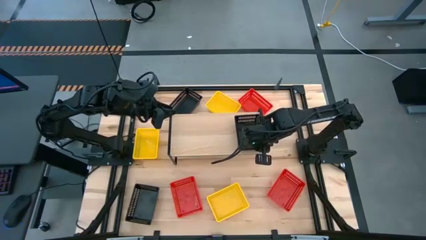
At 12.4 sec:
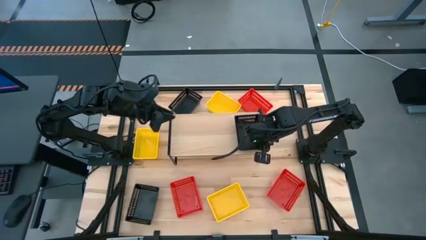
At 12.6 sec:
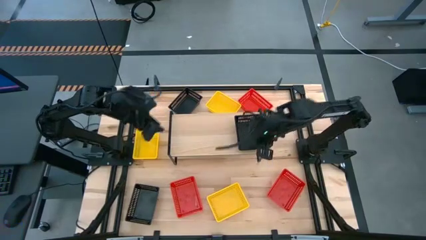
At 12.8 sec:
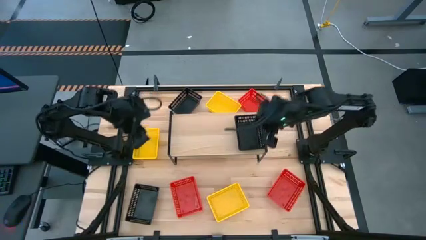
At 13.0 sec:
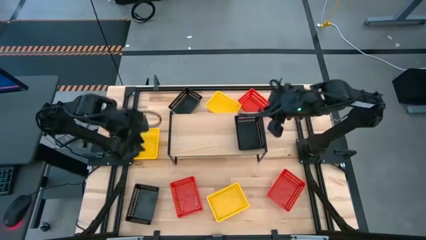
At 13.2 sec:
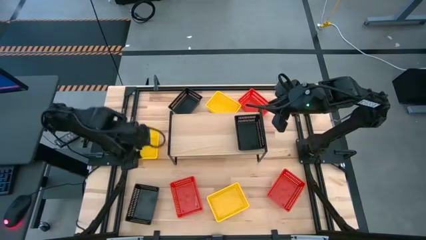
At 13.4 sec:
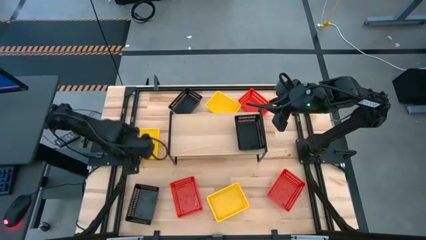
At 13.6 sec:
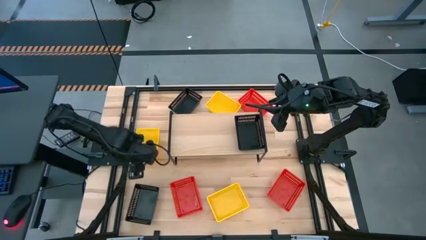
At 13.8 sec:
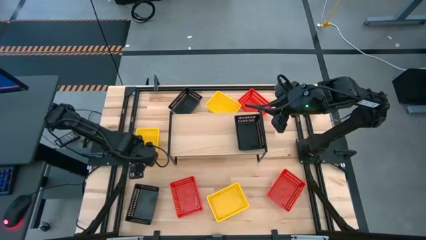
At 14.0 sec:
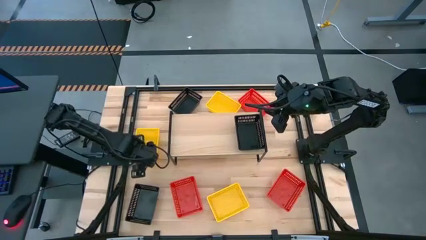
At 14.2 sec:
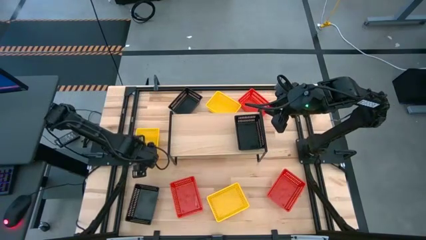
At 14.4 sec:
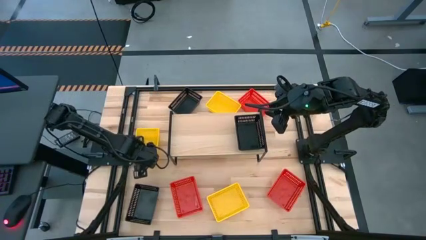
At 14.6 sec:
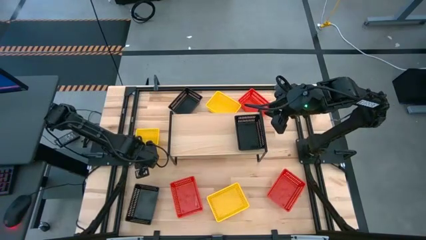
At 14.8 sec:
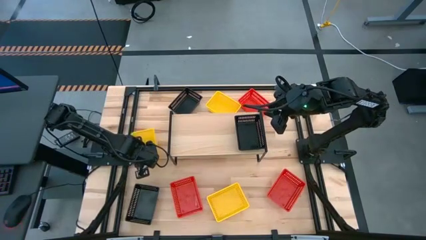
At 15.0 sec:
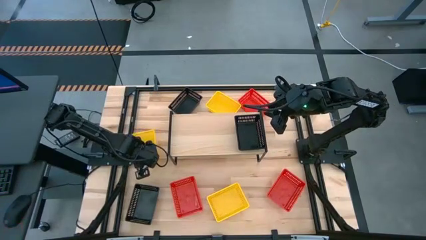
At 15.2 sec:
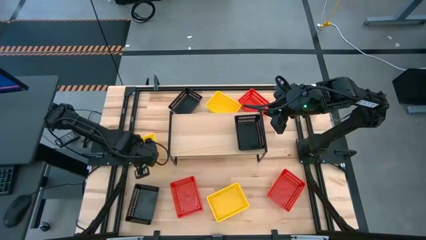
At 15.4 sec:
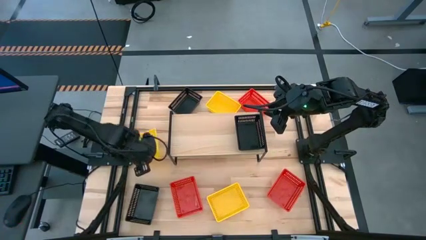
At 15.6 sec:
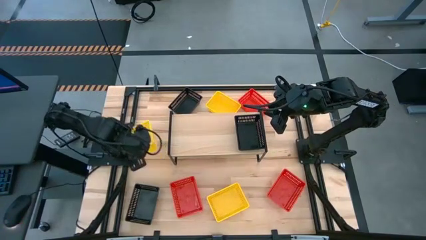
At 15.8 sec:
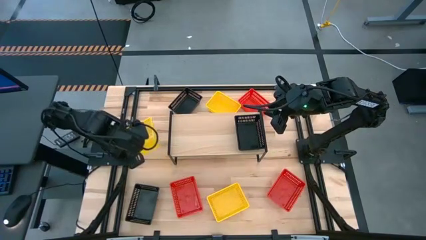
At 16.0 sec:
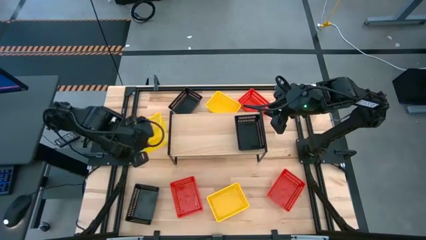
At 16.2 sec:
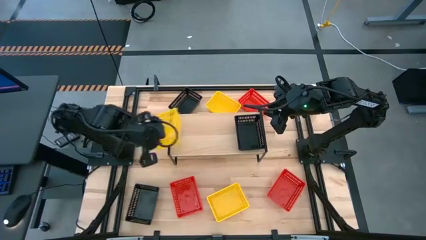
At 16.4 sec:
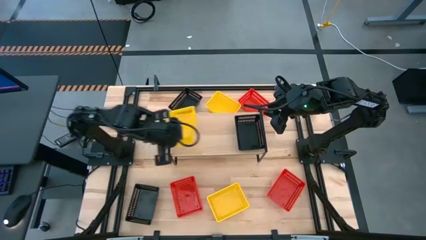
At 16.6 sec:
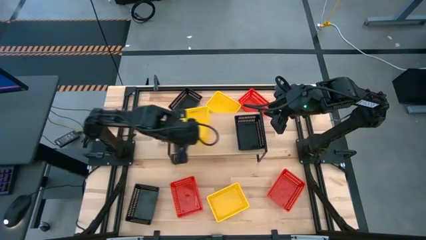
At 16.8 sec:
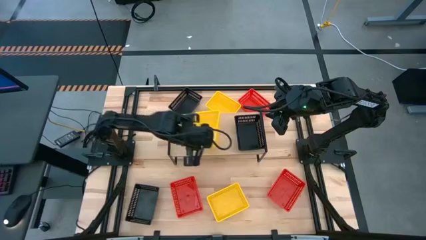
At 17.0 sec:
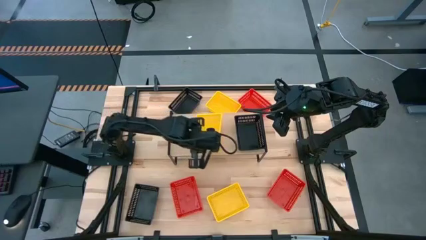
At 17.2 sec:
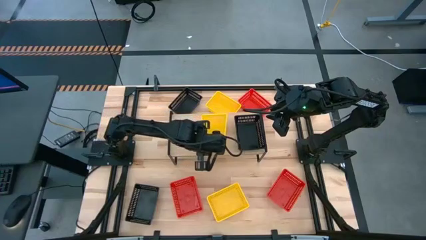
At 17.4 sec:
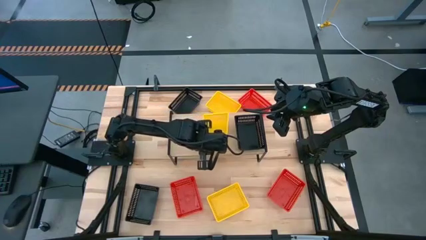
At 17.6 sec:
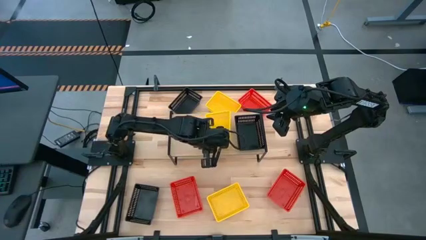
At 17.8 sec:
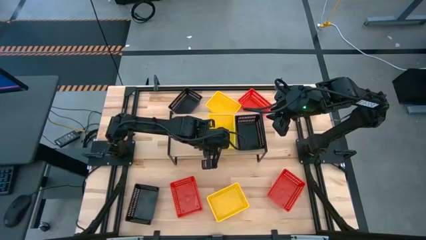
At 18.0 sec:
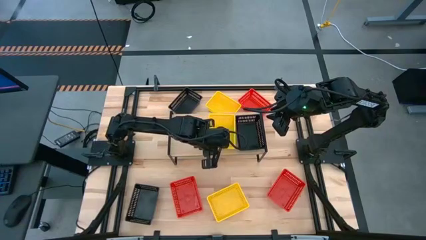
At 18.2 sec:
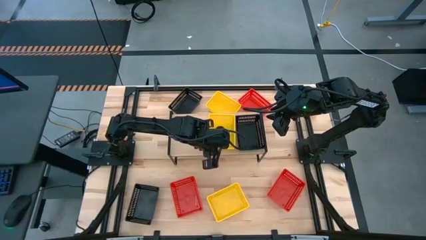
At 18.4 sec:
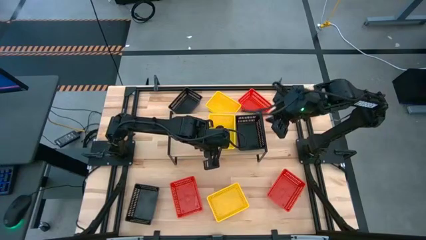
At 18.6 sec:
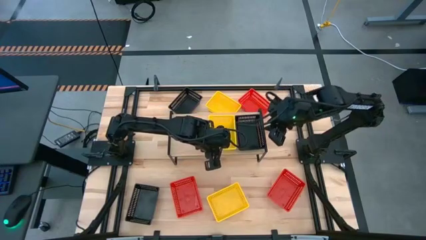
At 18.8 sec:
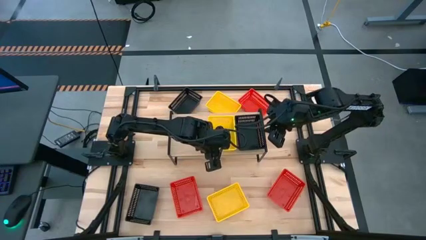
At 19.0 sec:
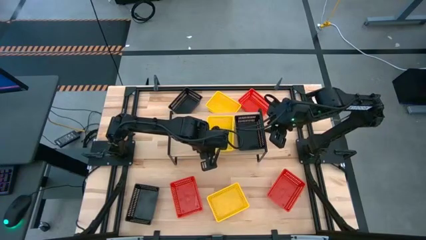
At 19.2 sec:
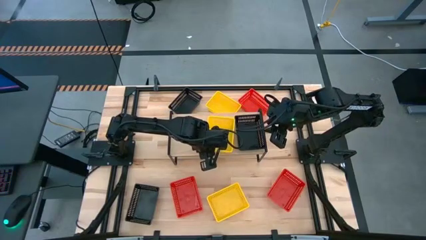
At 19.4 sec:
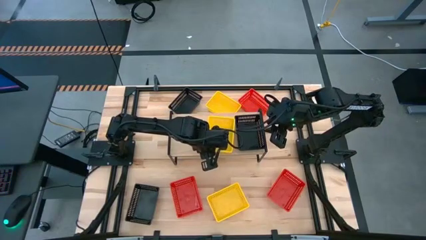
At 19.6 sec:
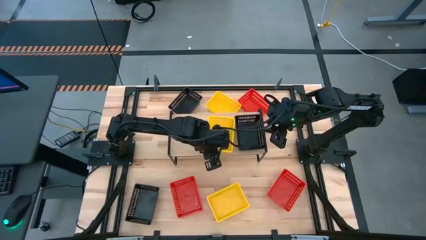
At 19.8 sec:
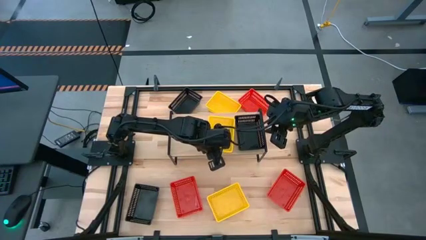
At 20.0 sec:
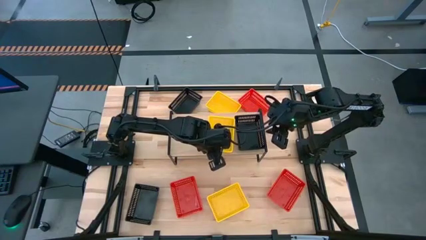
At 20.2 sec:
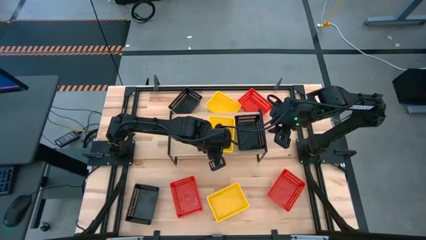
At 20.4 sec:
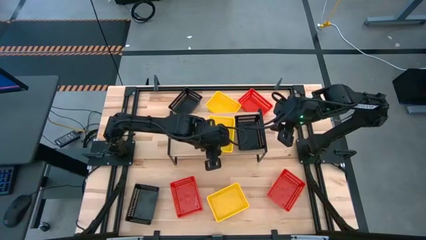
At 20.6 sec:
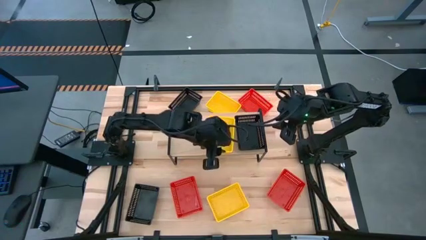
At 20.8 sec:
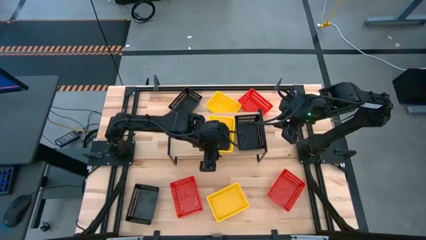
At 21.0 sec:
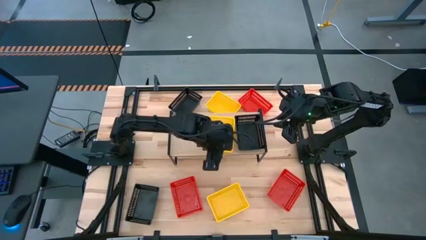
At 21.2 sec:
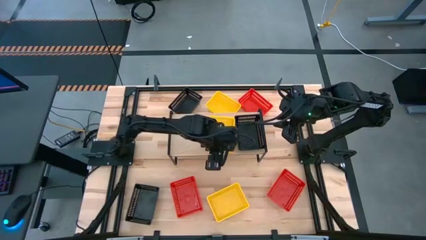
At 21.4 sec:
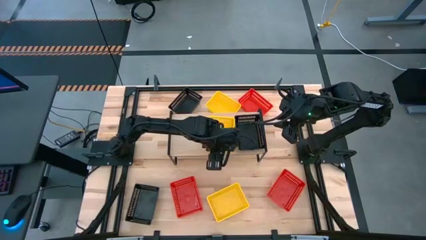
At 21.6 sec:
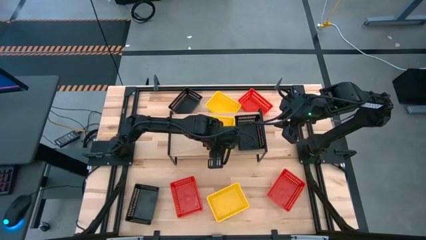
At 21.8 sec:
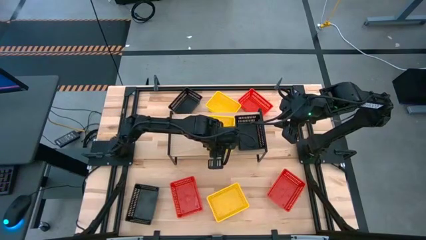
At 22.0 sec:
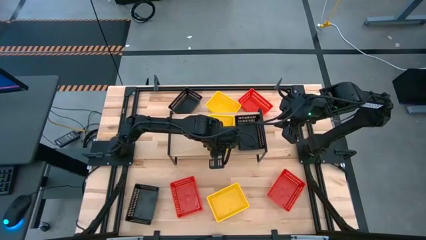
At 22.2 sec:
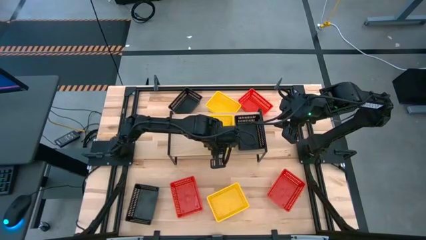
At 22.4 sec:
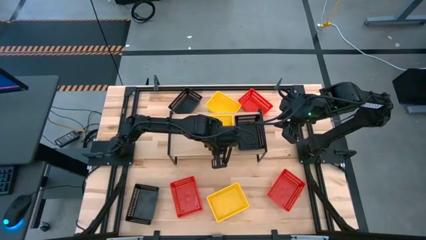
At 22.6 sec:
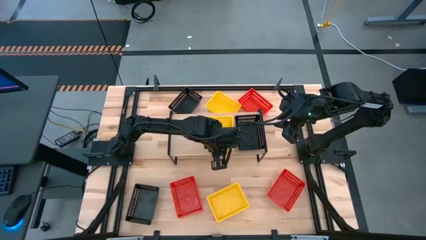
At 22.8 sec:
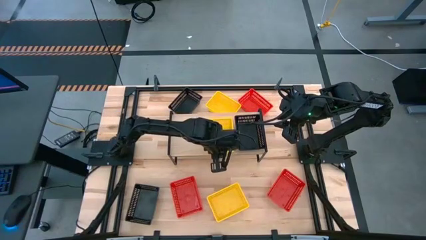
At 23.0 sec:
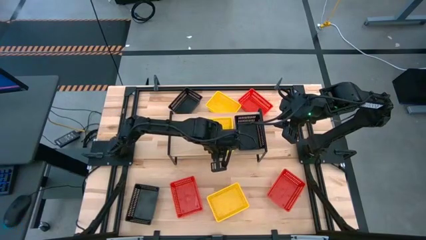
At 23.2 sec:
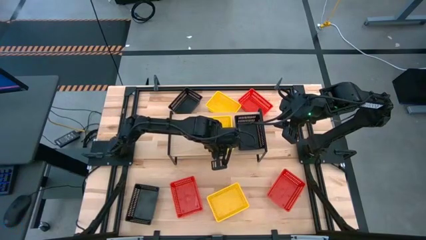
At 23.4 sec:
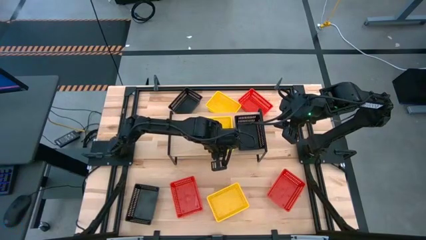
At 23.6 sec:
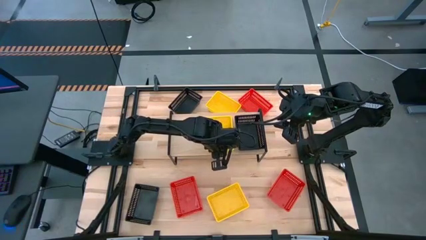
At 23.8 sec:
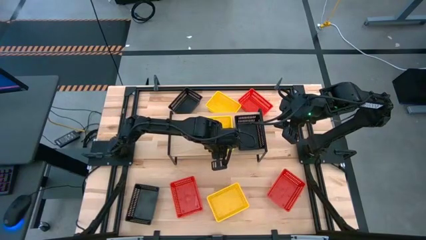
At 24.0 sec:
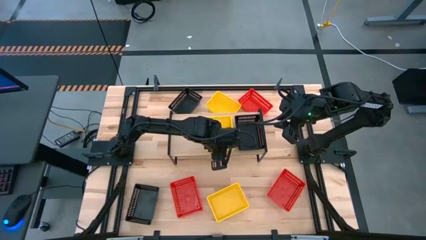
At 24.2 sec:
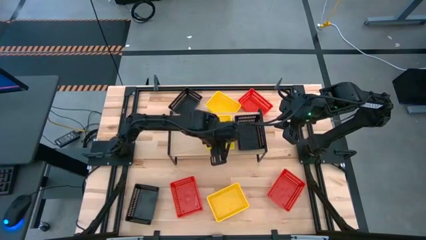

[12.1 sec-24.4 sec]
Task: Stack baskets on shelf by color
Put the center yellow bin on the shelf

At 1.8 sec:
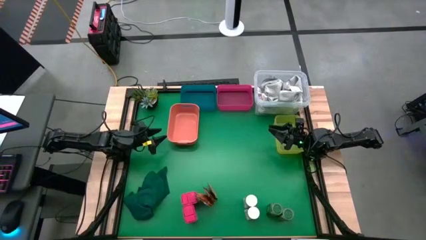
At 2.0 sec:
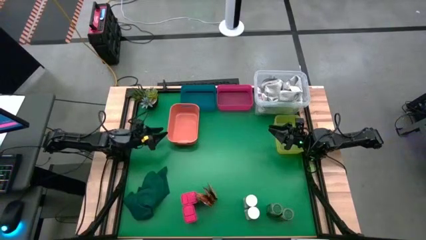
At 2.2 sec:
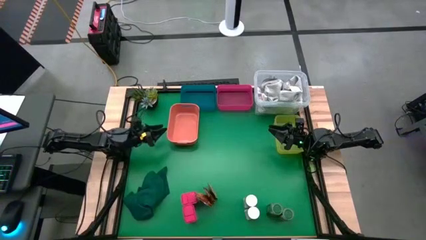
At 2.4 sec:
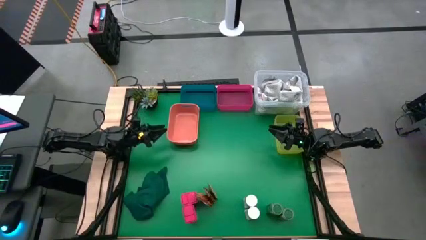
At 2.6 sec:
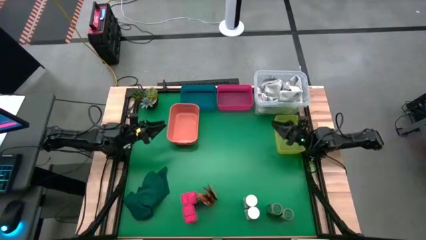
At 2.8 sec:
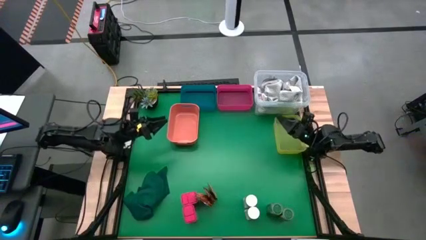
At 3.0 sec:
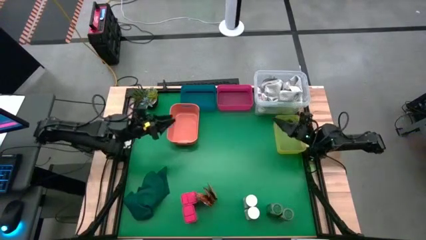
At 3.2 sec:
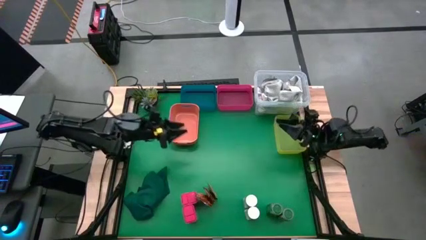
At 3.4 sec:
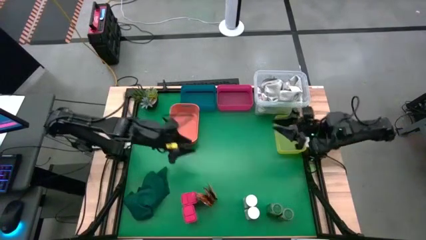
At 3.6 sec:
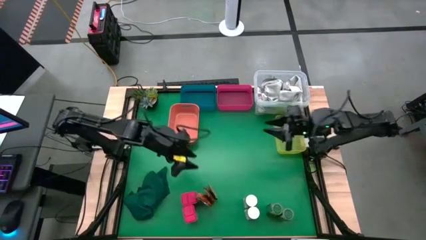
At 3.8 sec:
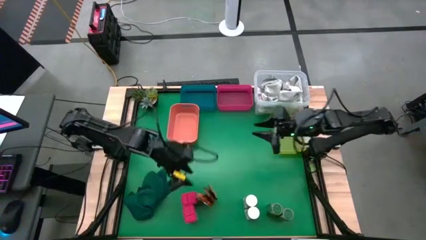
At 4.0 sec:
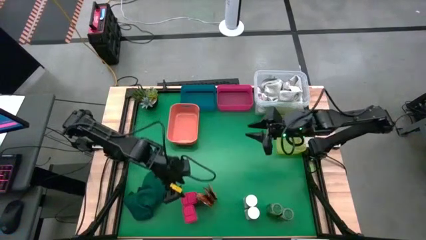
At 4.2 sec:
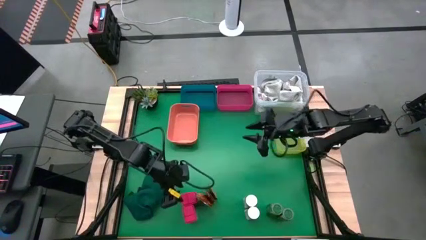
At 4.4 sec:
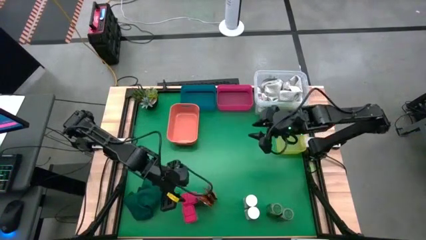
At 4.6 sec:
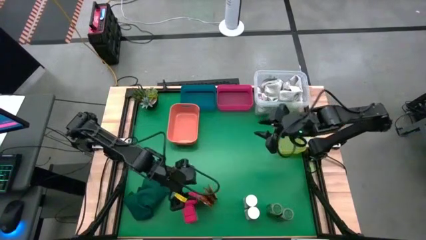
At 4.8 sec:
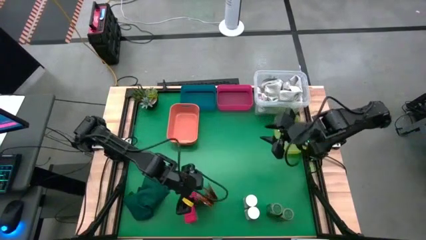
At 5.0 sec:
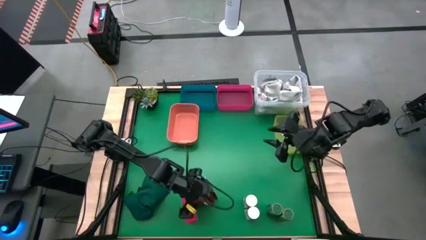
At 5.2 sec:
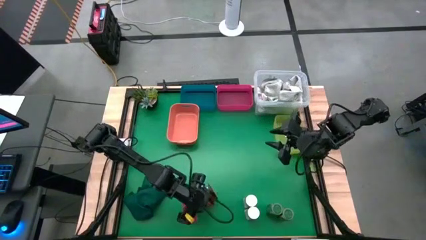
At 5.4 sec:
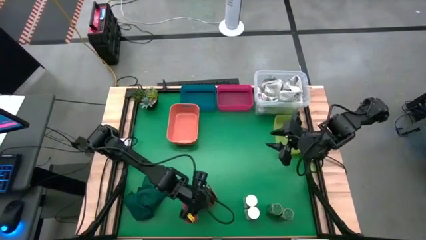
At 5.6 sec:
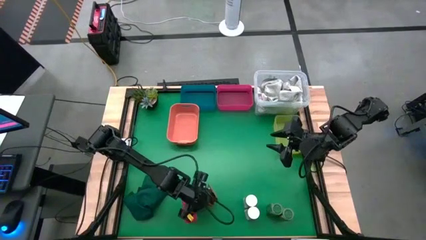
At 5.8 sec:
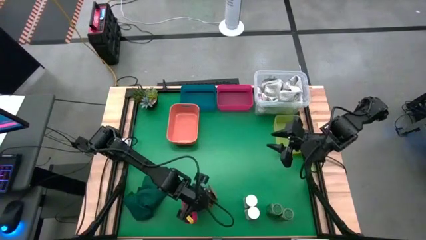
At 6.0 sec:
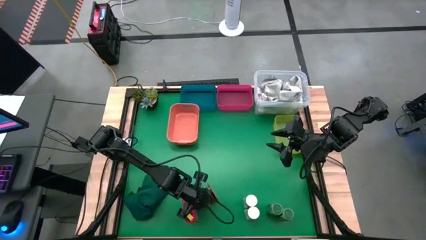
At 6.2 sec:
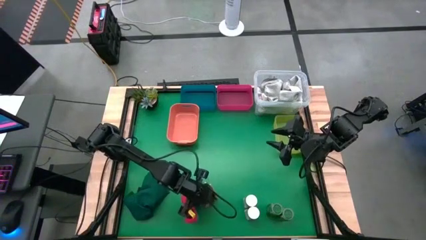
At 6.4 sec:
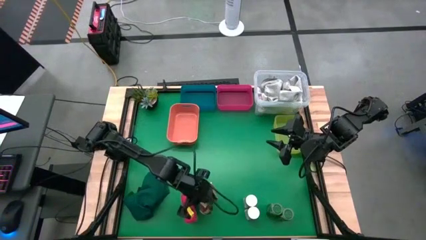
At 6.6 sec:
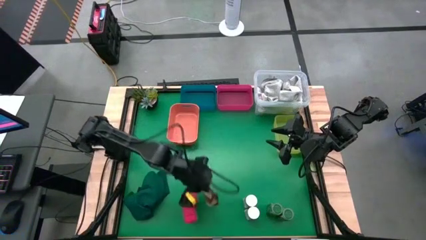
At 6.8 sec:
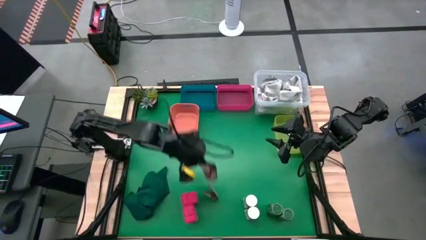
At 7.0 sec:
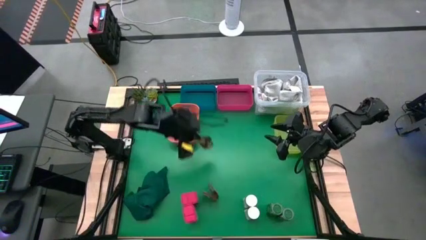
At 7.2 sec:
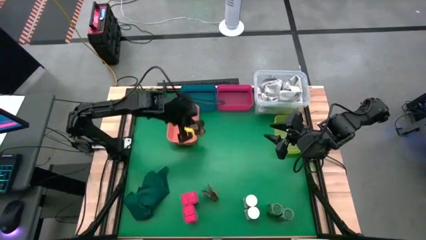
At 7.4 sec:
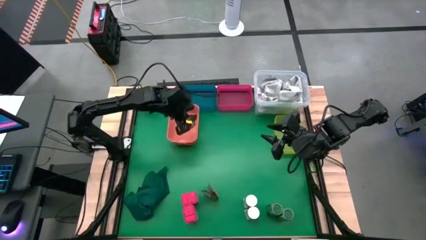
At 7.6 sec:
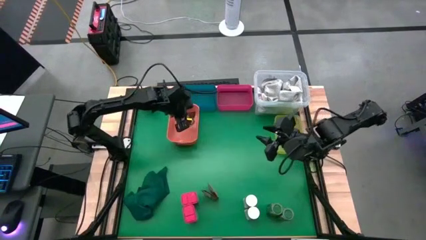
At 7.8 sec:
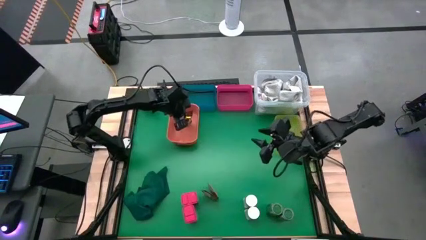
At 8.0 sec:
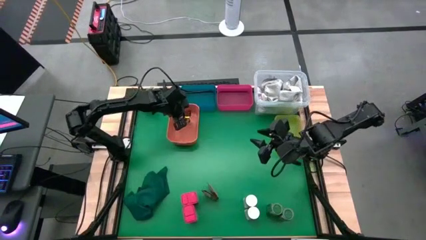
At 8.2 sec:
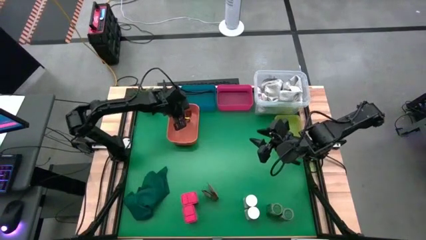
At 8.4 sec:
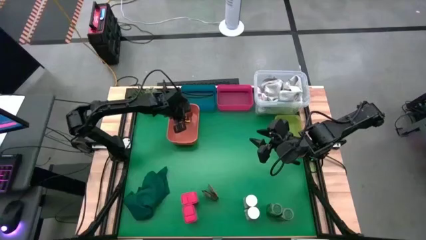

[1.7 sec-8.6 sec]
Task: Sort spices by type
Put the left brown spice bag into the orange bin
